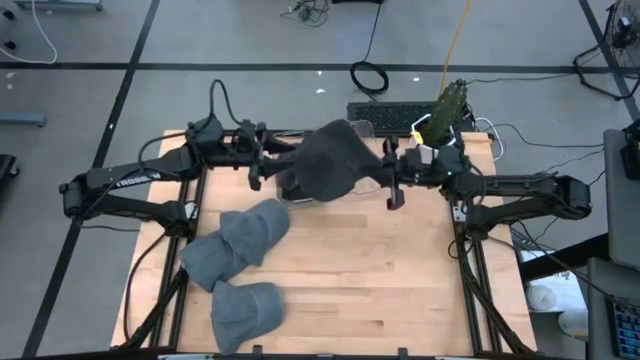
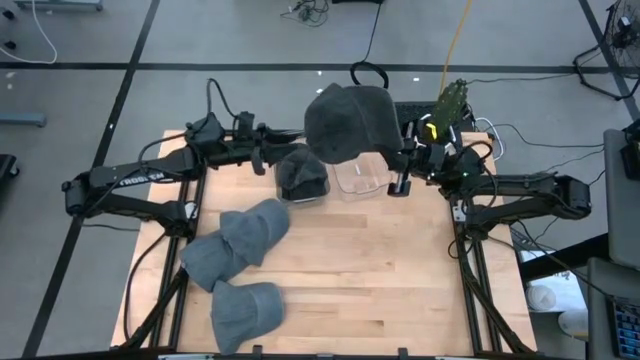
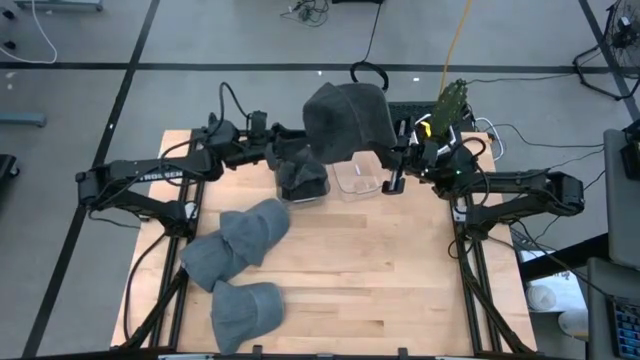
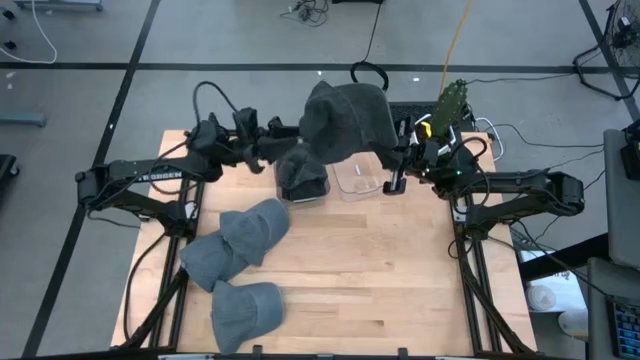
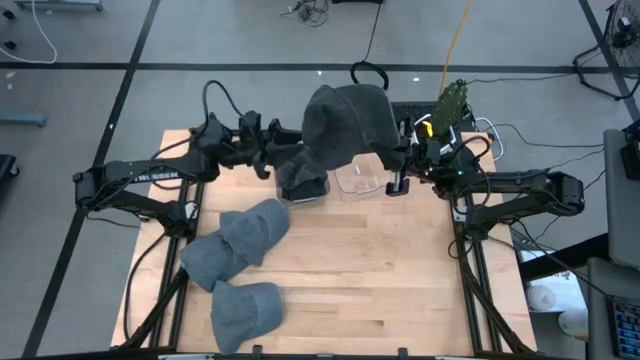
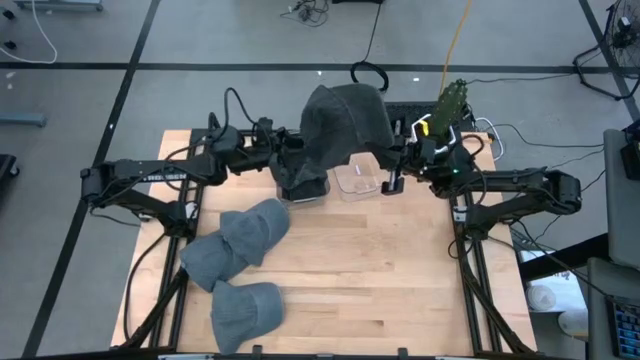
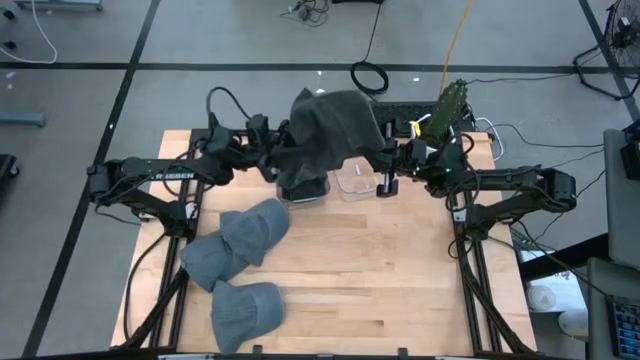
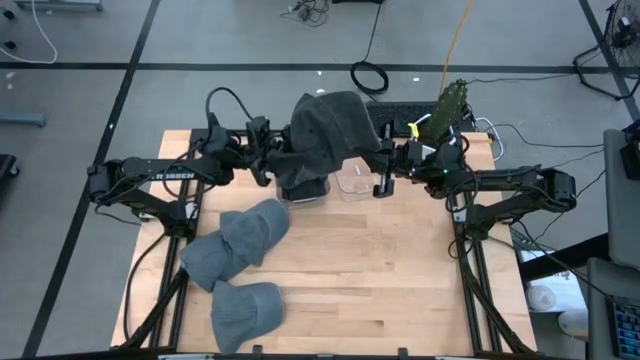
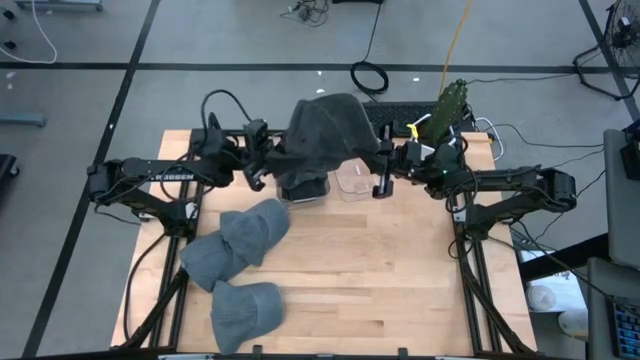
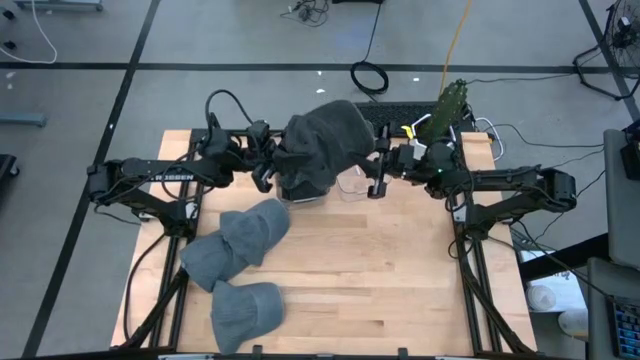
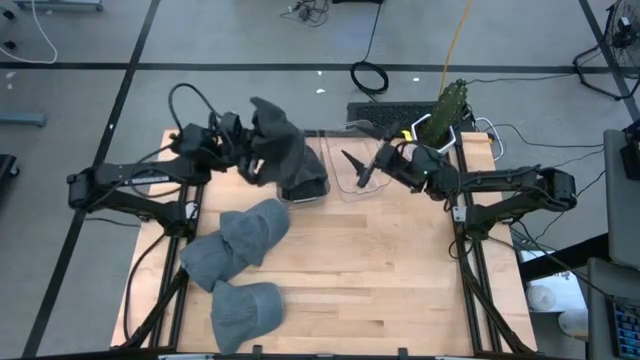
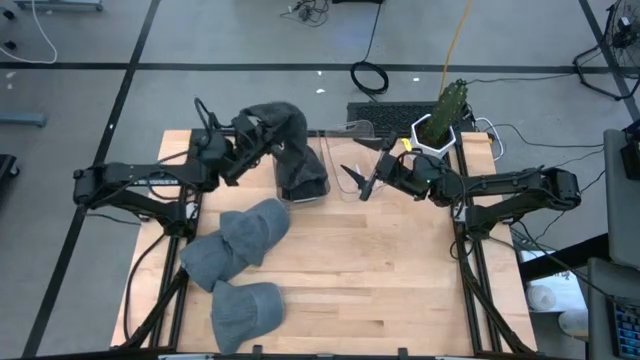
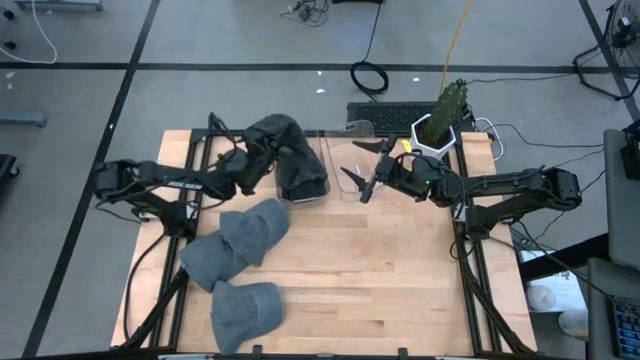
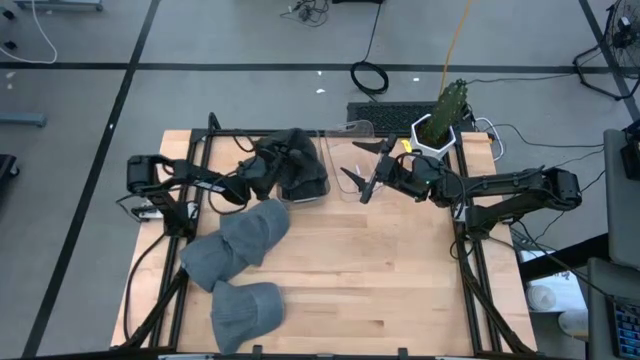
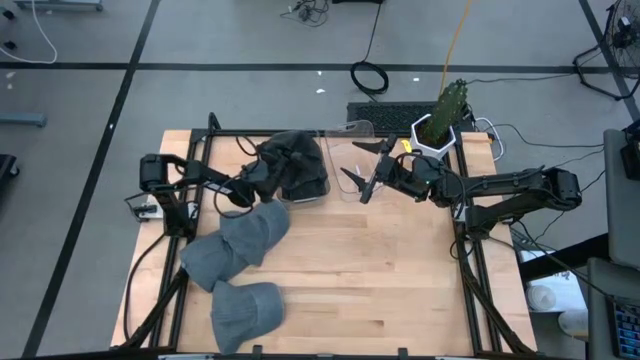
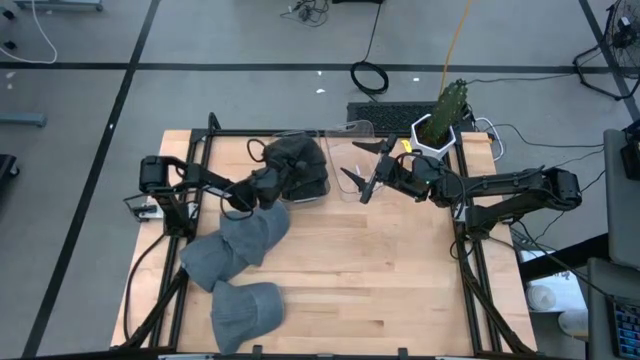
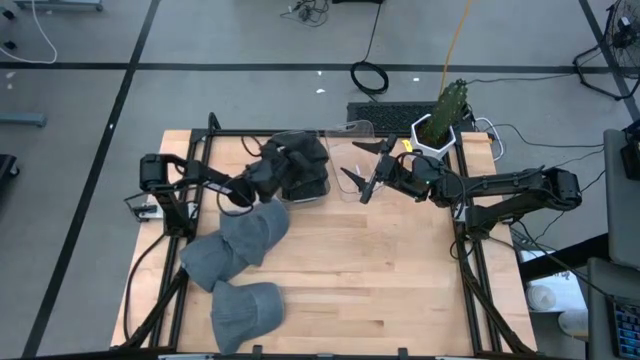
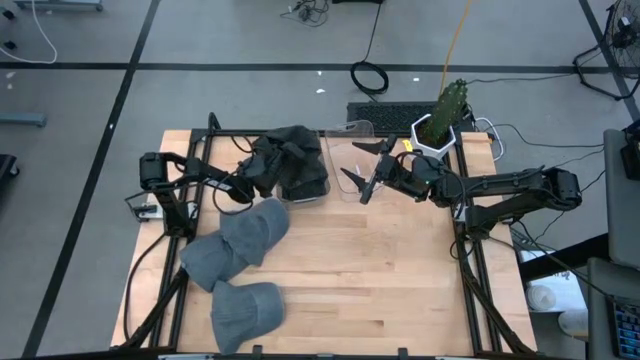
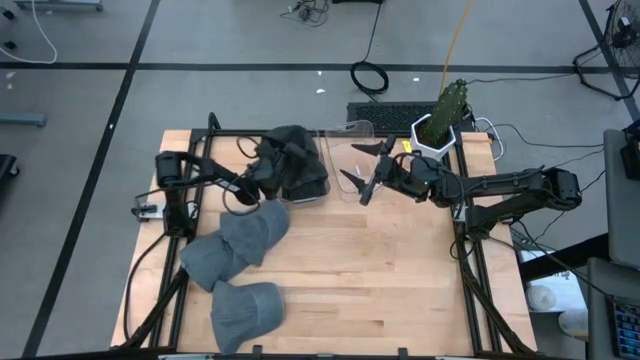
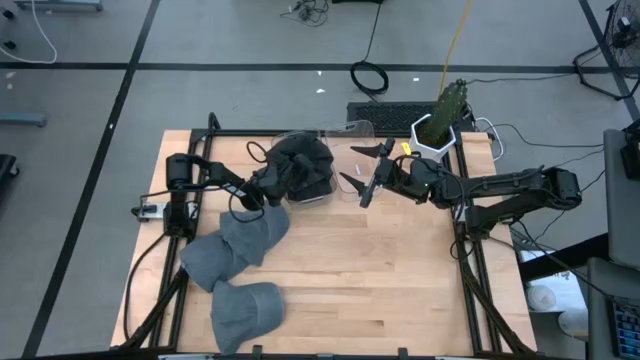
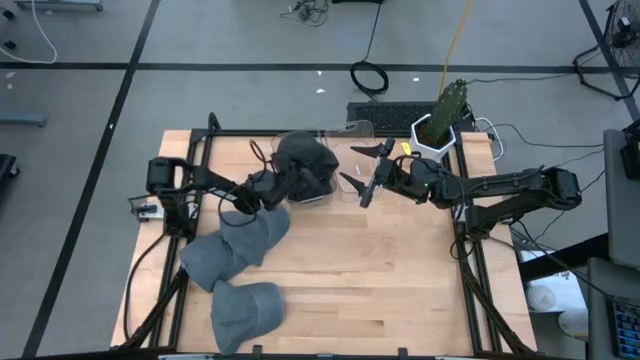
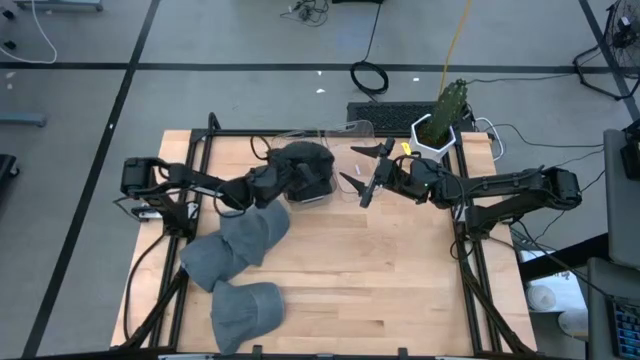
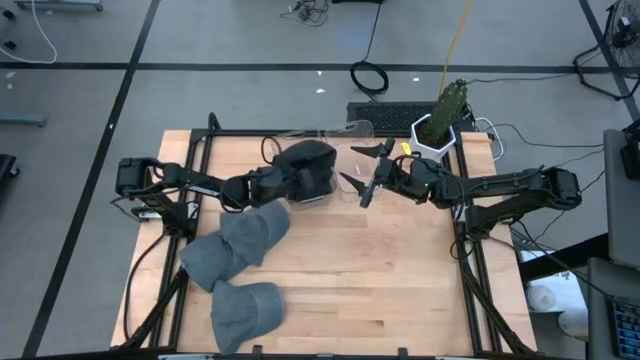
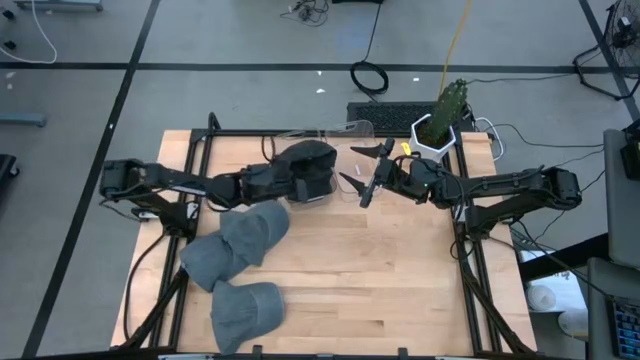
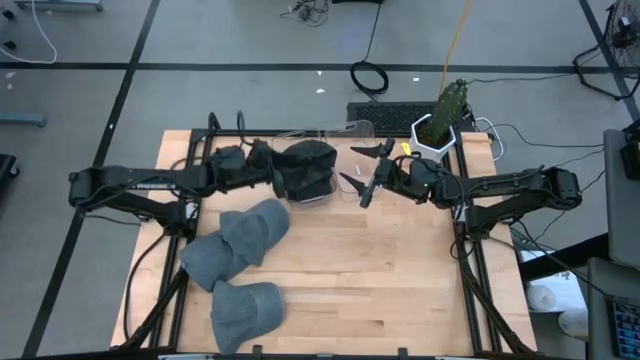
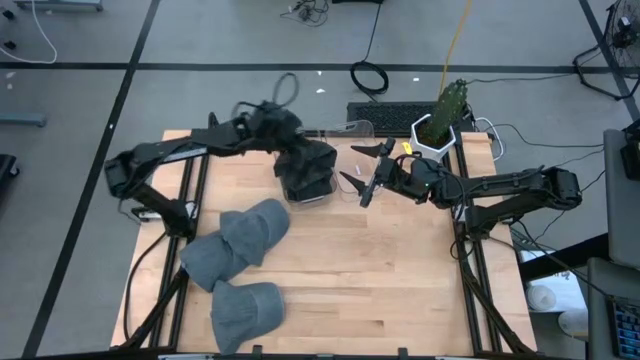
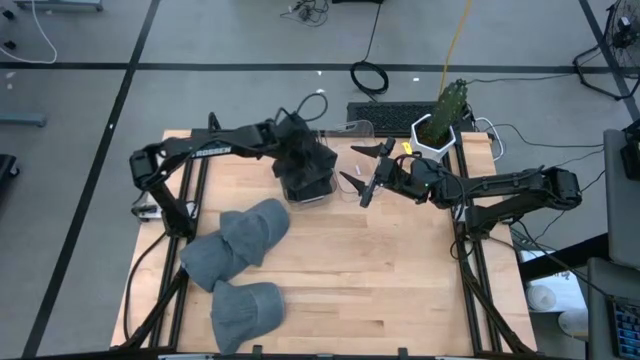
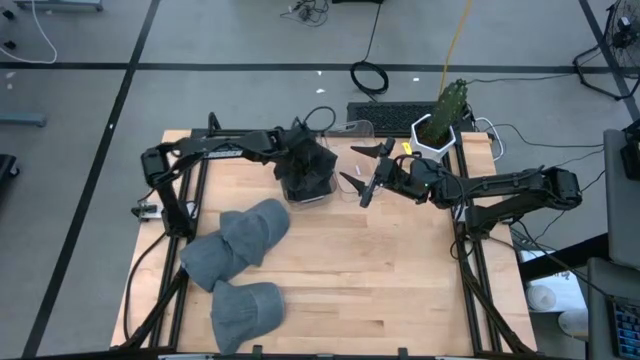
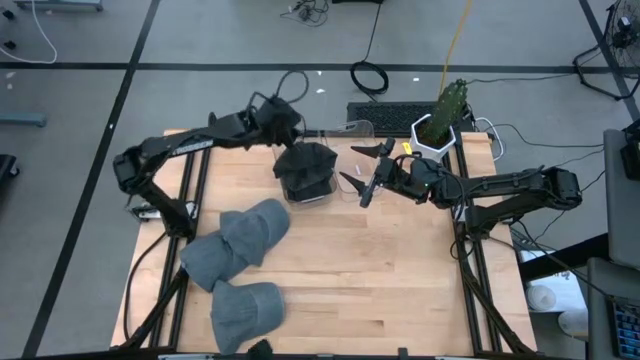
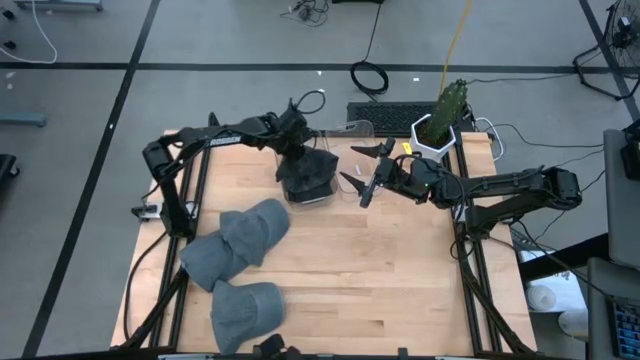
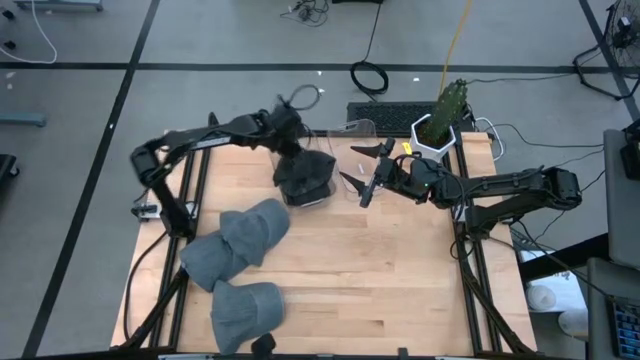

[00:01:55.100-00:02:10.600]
Task: Pick & Place hat
Put the black cap into the left transparent bin

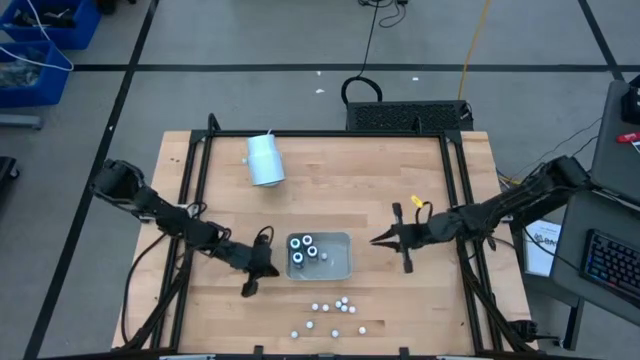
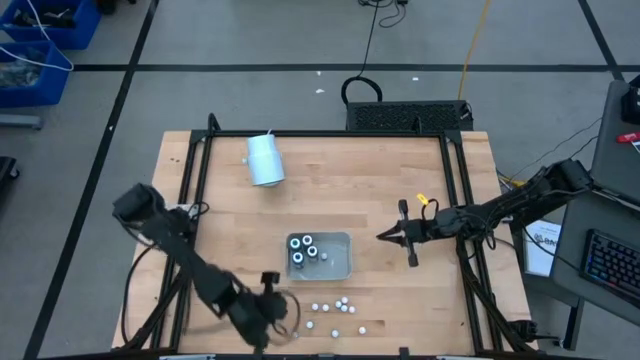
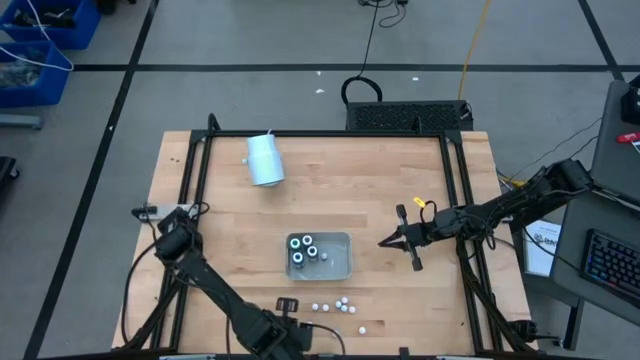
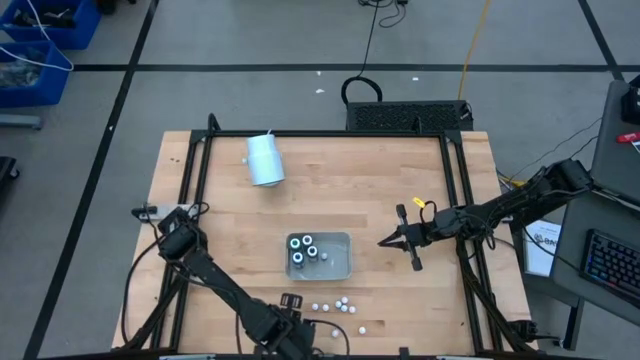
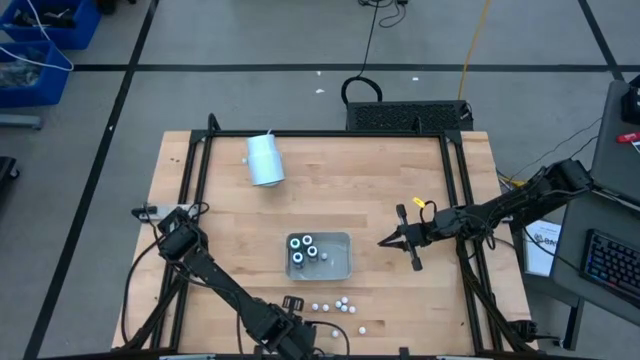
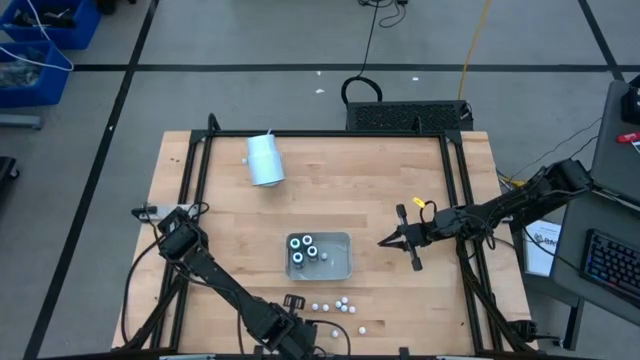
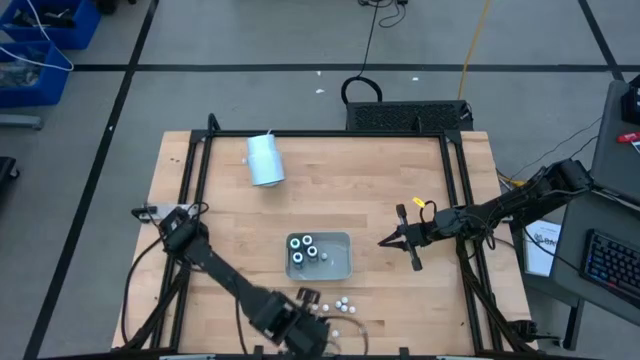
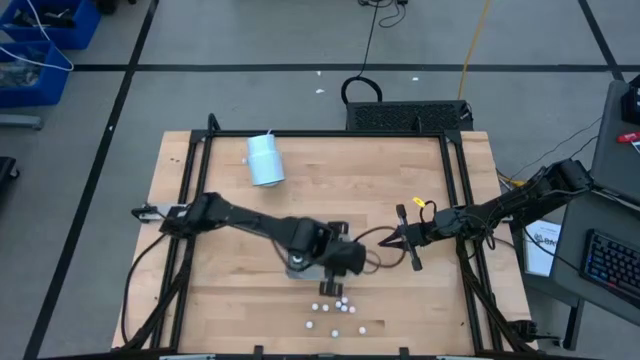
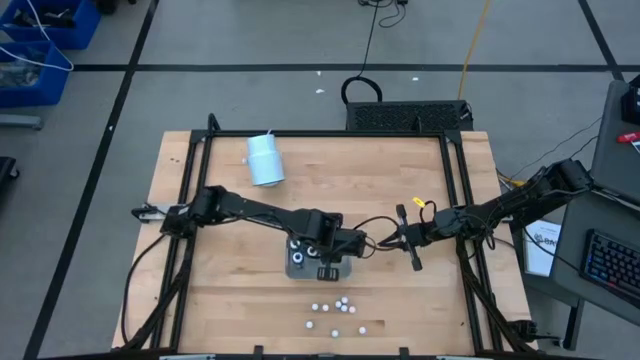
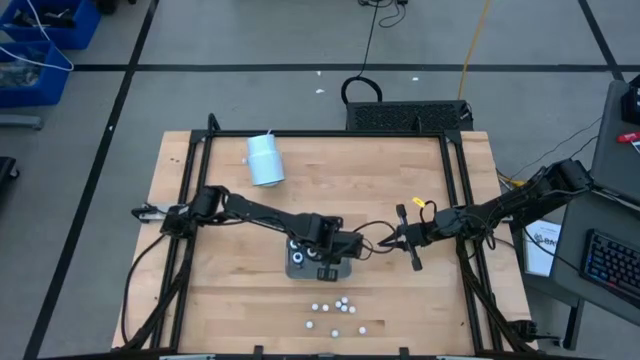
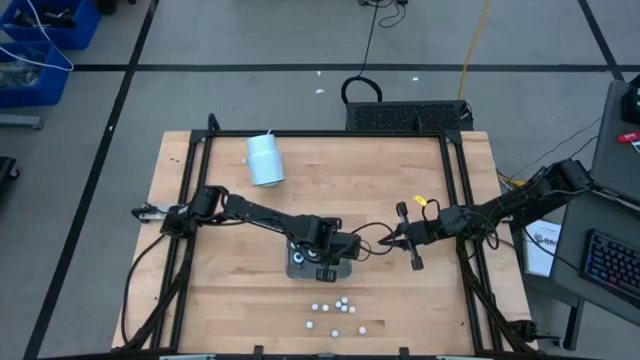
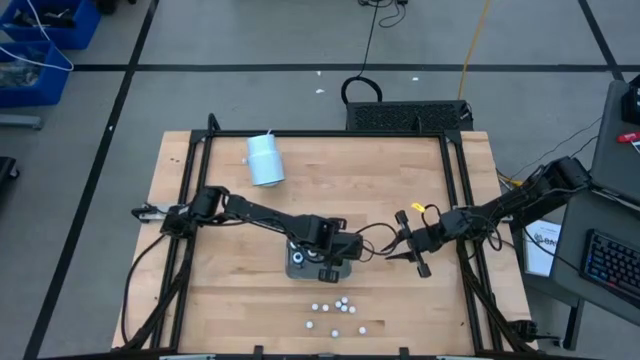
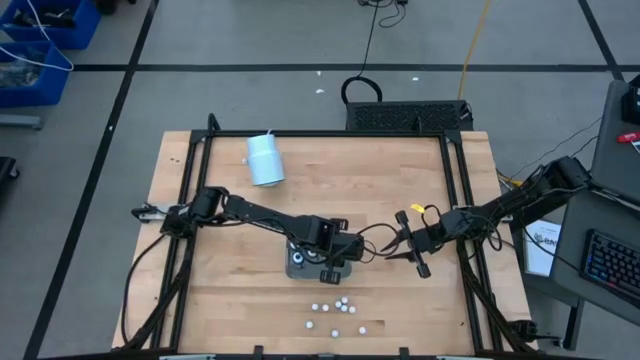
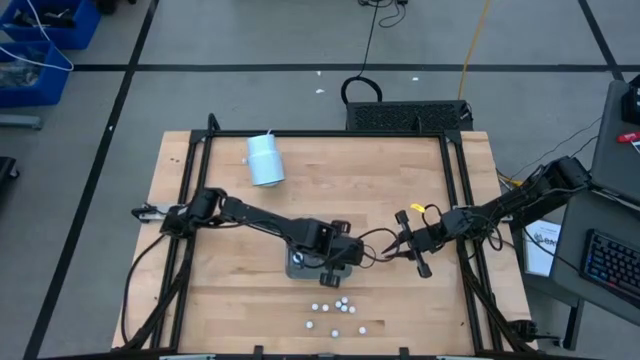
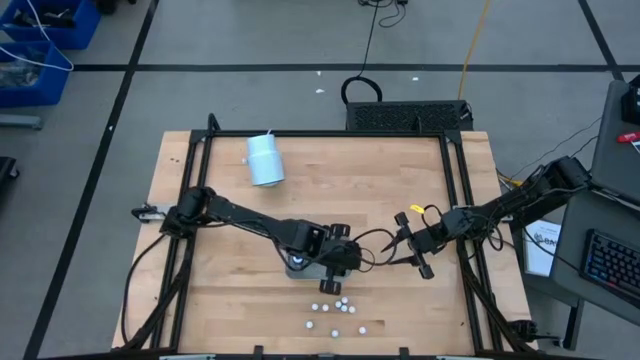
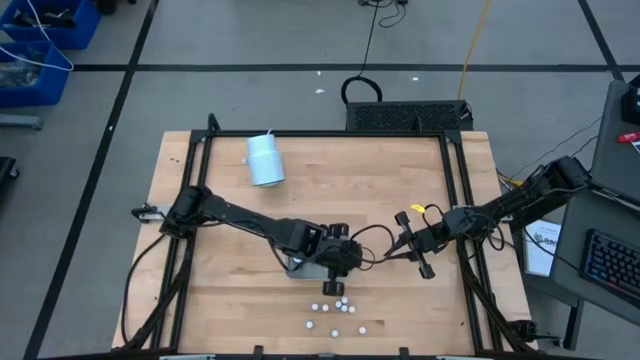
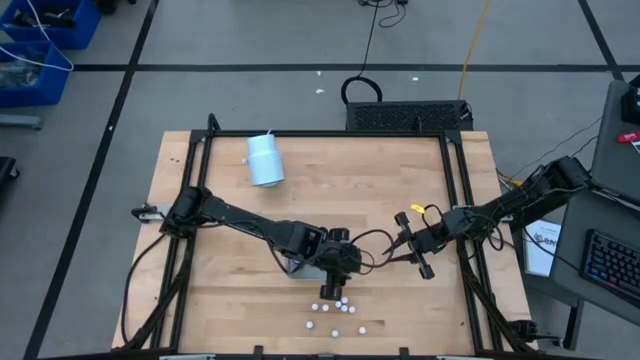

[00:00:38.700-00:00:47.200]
Task: Pick & Place food coloring
Put the small green food coloring bottle into the gray bin
